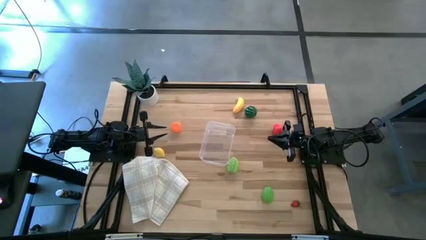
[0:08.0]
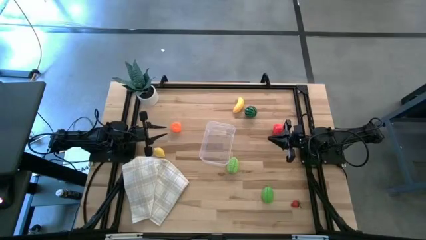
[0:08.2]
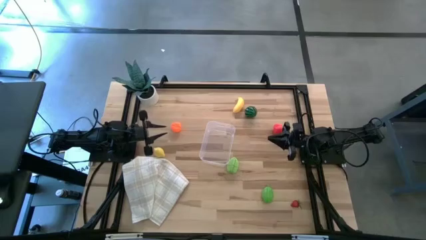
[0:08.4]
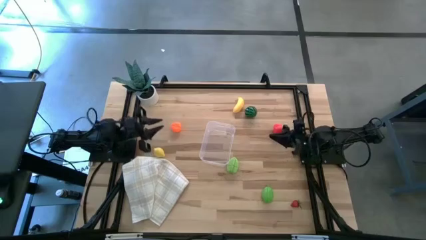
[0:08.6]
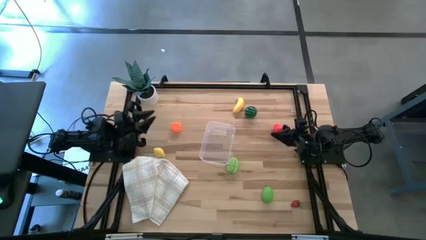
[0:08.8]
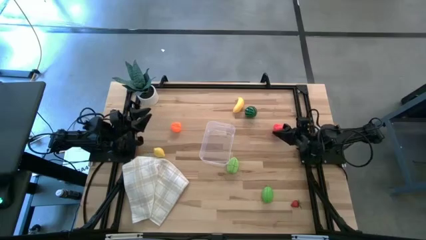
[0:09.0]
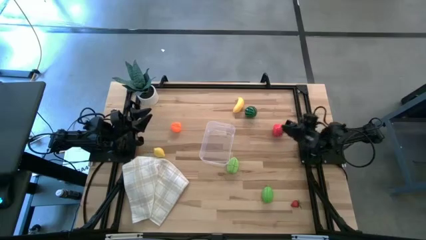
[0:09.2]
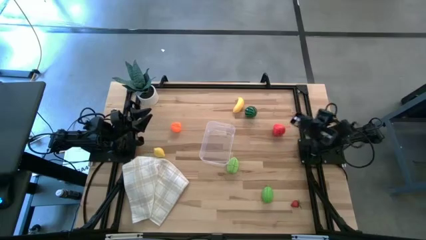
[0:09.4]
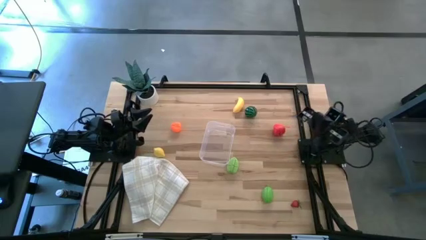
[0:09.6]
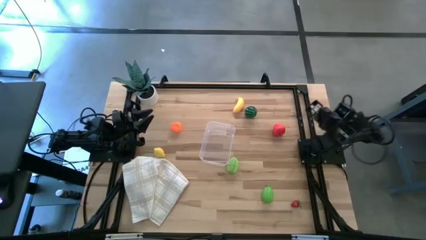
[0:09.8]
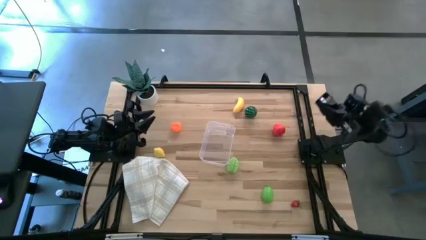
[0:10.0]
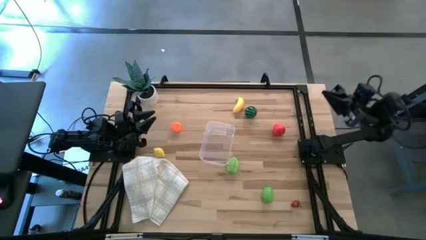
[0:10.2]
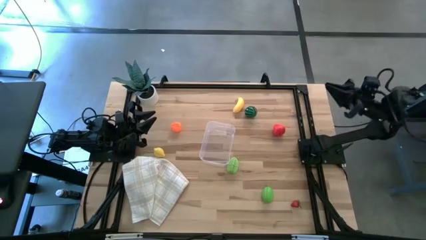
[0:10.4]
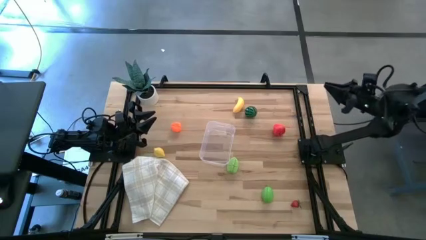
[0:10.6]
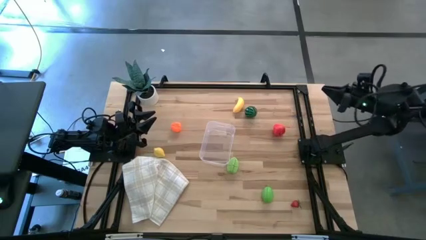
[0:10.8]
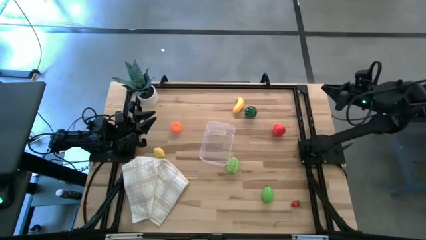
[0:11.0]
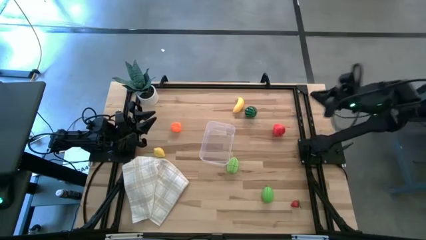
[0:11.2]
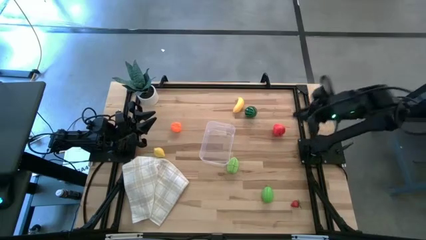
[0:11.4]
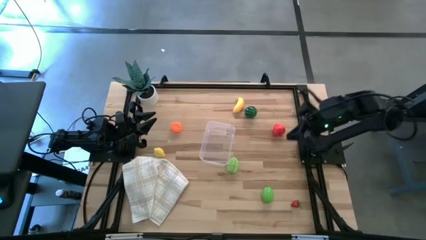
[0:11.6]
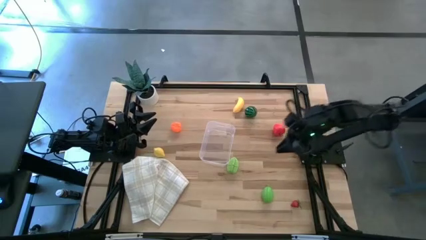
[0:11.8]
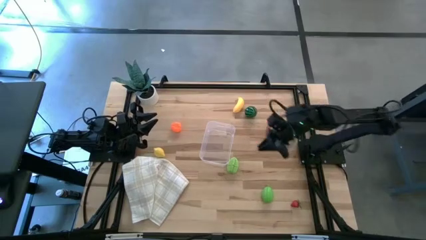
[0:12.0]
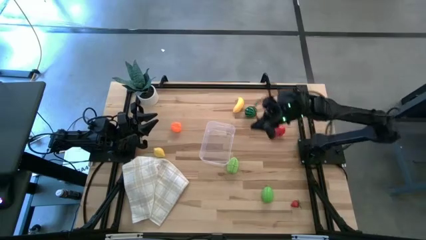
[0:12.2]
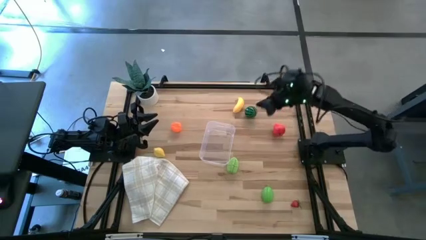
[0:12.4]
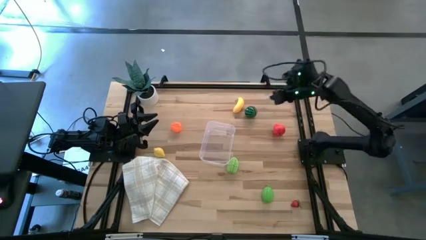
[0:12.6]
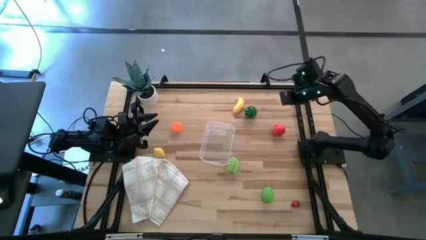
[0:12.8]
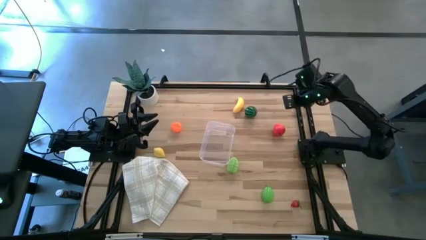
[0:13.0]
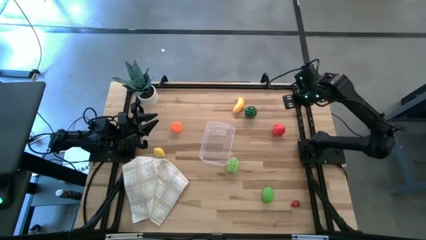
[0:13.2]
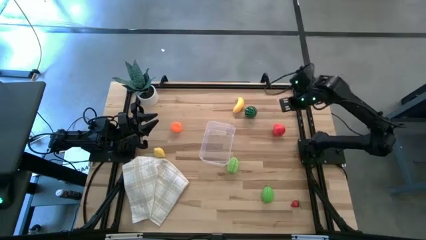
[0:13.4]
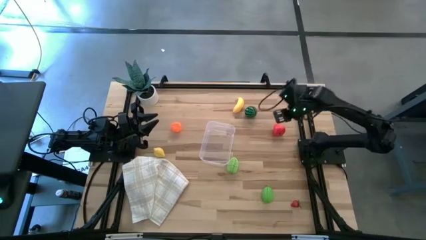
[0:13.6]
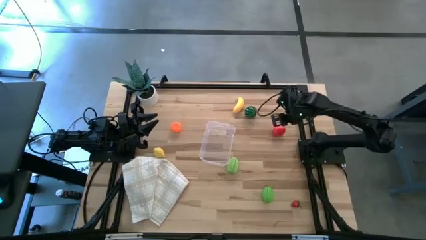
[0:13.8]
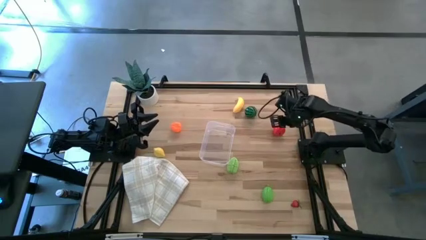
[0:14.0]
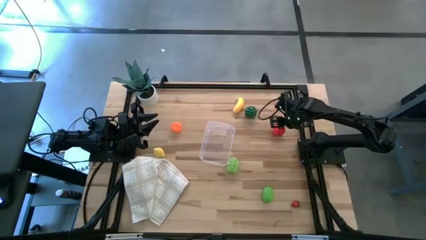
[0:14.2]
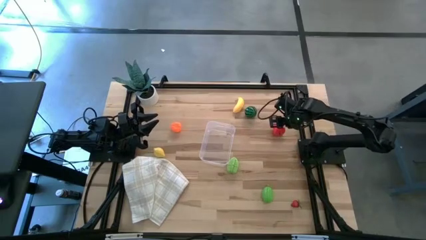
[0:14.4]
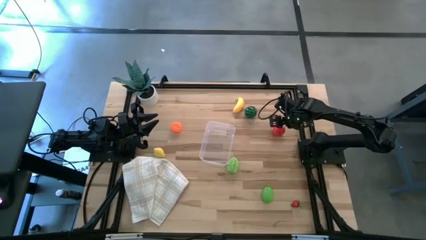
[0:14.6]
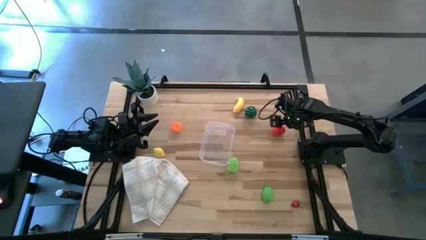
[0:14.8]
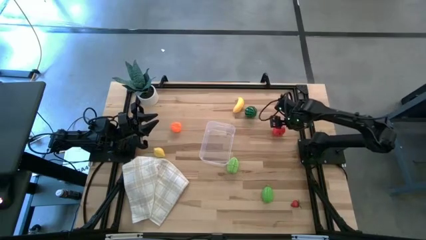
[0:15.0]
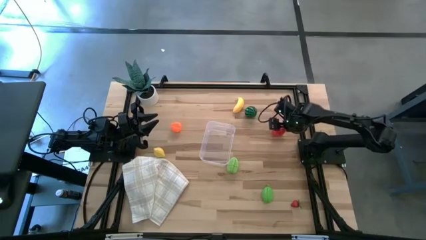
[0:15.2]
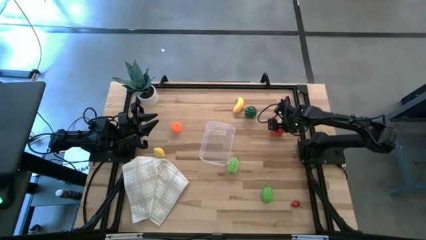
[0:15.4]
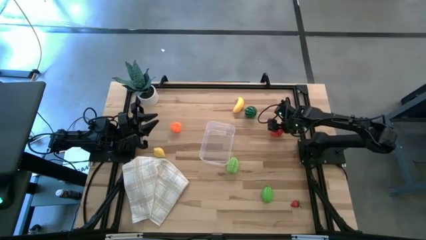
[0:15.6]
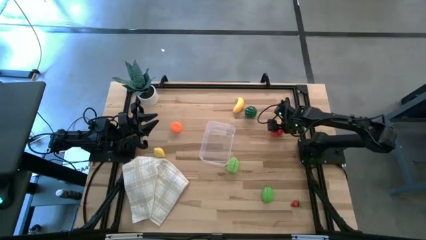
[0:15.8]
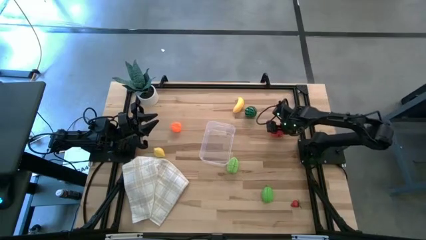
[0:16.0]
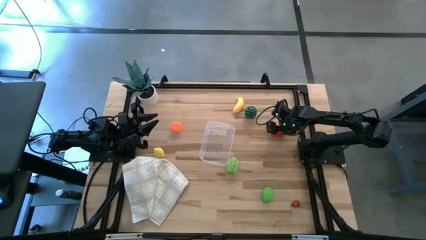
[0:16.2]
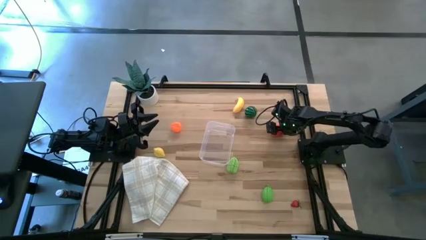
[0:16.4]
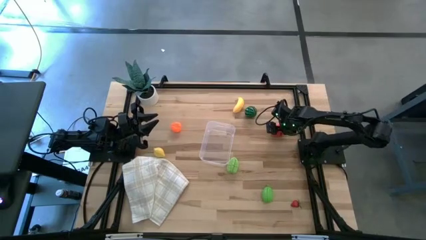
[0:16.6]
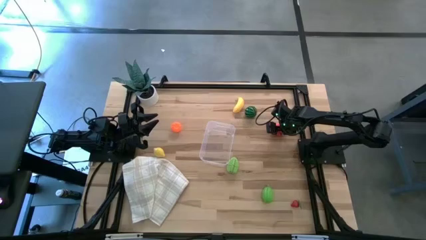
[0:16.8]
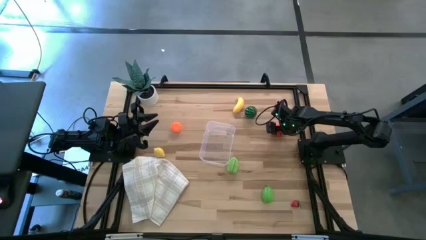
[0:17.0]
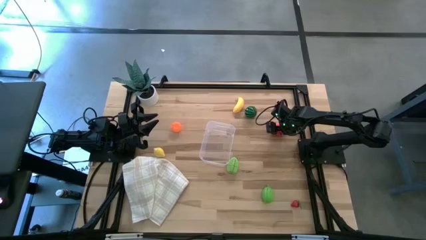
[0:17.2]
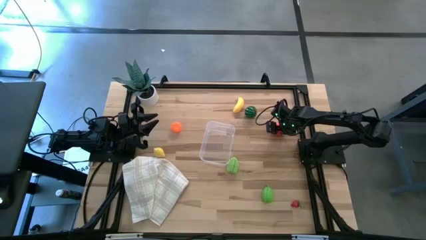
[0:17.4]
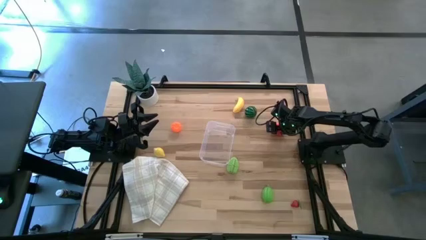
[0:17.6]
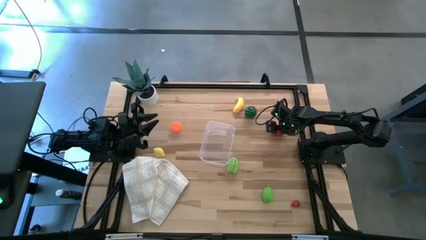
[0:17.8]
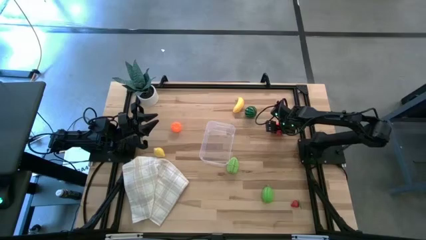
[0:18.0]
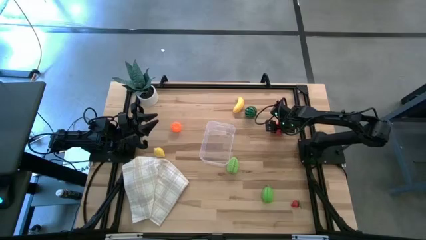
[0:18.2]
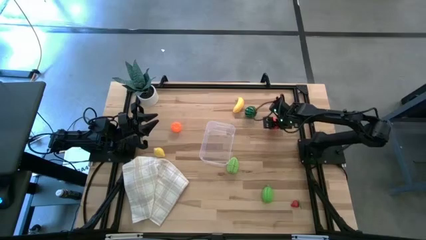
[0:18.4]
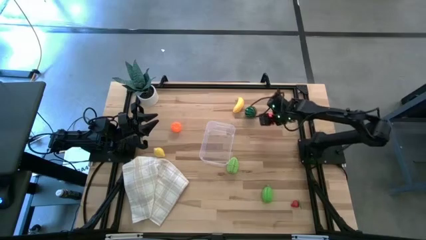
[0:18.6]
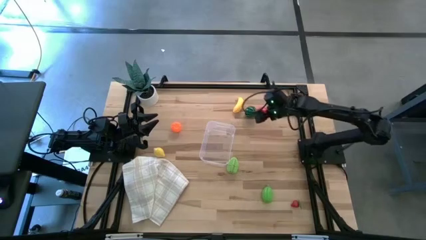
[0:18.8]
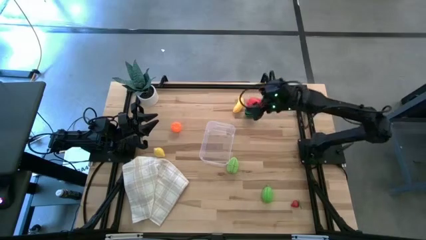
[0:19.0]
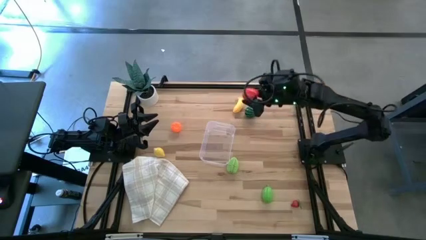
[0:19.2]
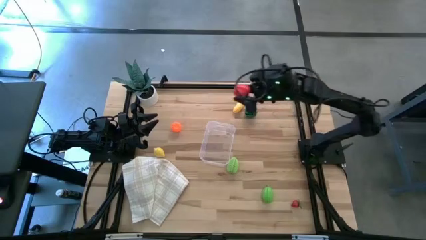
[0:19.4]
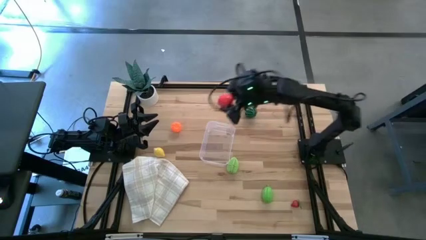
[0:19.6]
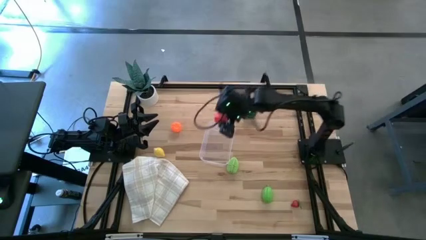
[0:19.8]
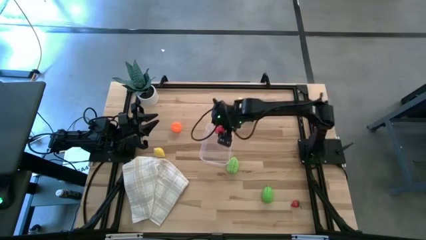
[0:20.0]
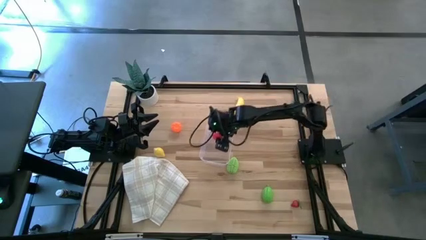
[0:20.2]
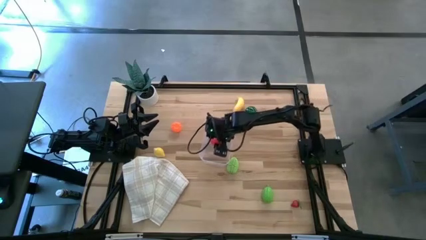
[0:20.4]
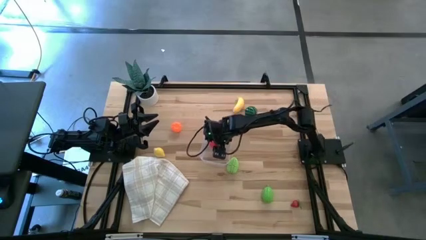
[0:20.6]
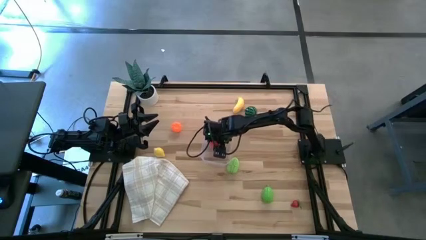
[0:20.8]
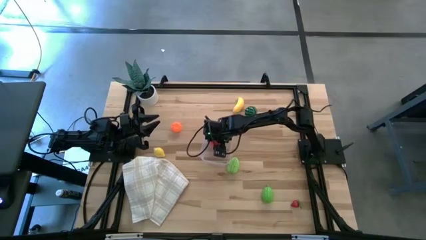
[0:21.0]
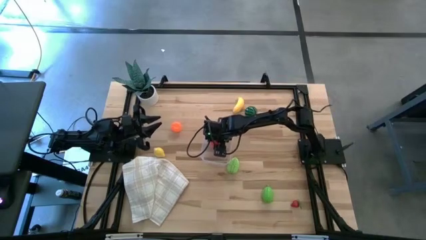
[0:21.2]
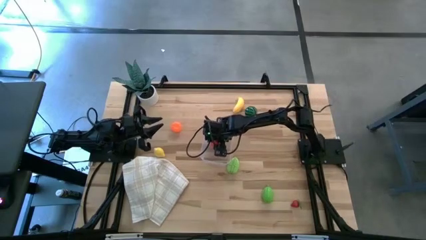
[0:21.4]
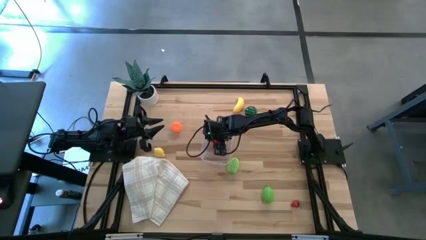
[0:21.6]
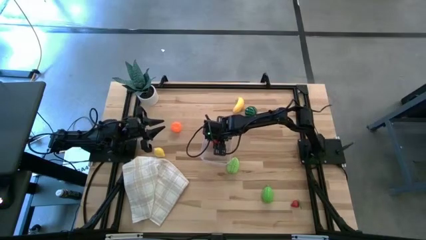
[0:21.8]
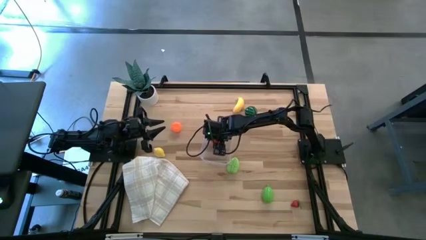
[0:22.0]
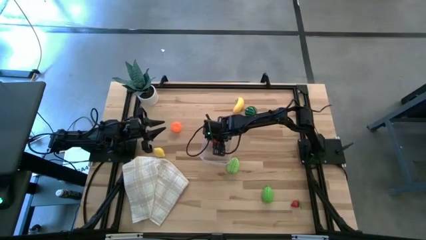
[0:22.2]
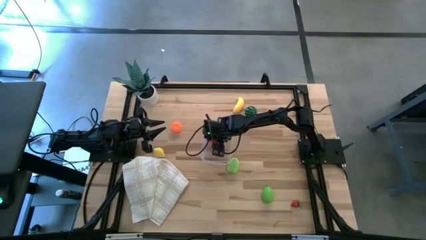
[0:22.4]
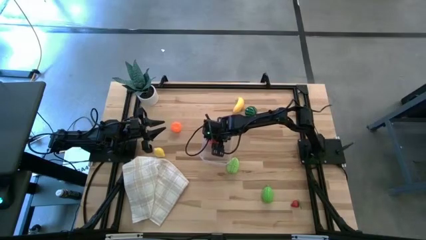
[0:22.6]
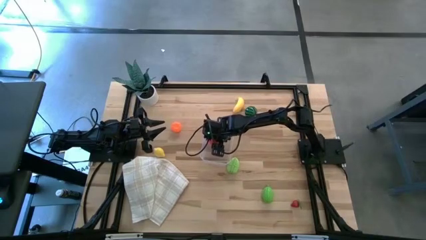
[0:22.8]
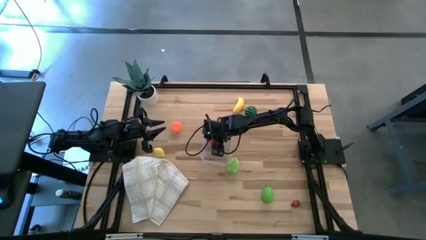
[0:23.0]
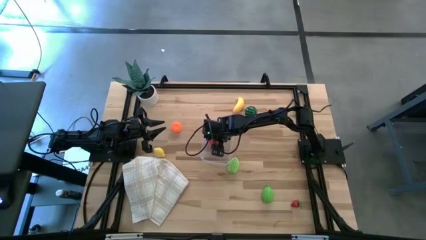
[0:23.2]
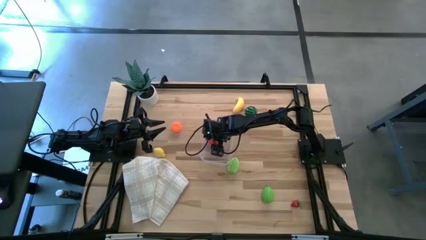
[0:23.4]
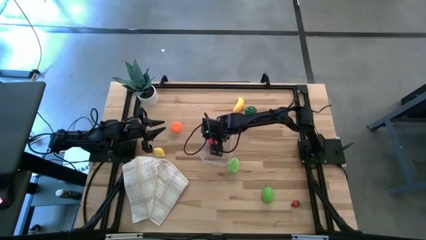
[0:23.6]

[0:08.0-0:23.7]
Task: Pick and placing Produce into tupperware
Put the apple into the transparent bin
